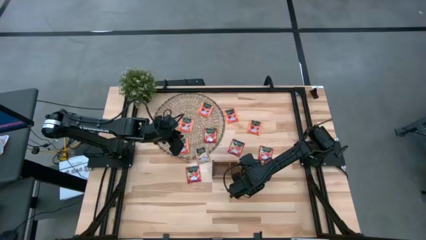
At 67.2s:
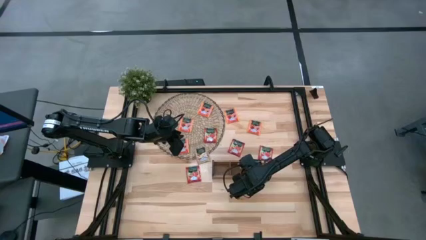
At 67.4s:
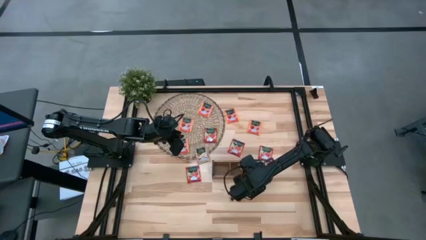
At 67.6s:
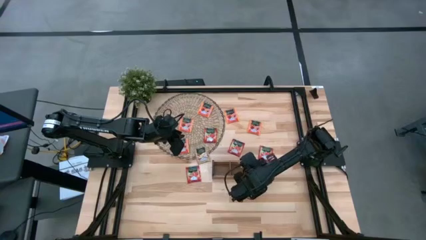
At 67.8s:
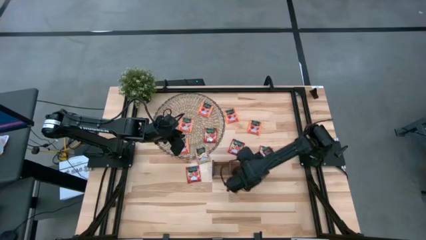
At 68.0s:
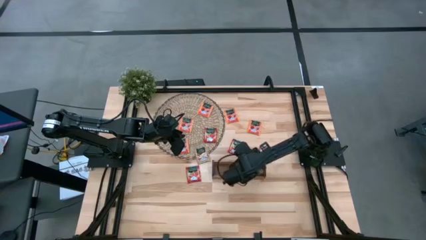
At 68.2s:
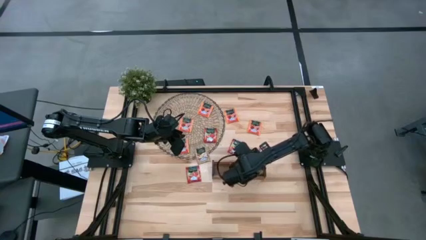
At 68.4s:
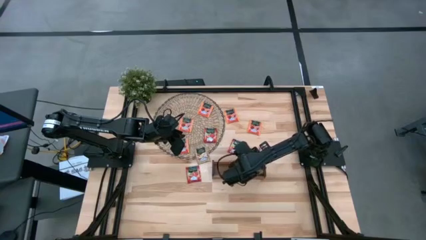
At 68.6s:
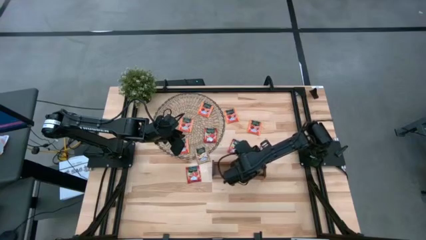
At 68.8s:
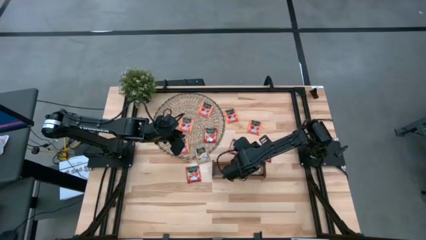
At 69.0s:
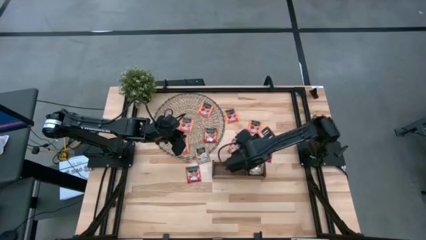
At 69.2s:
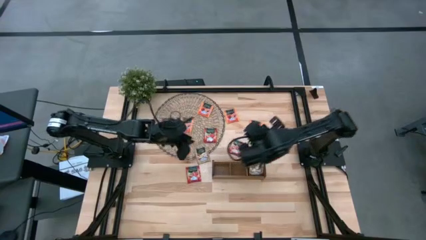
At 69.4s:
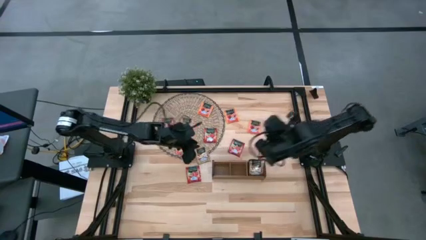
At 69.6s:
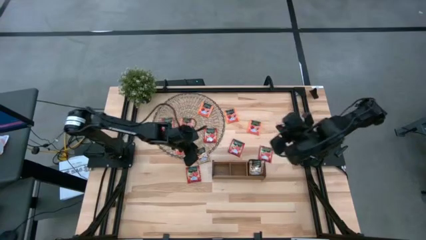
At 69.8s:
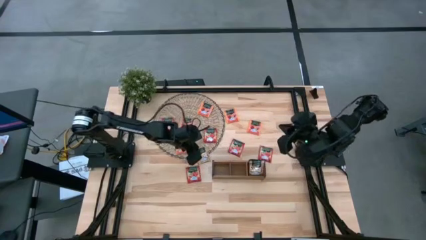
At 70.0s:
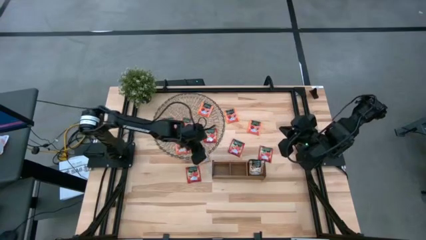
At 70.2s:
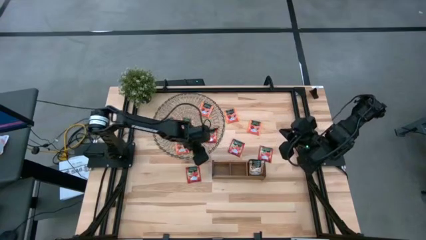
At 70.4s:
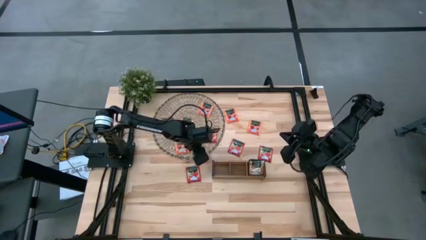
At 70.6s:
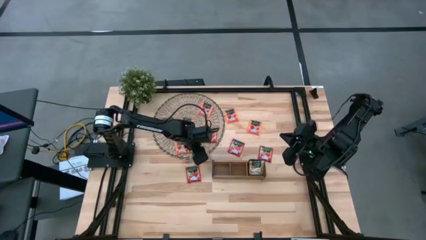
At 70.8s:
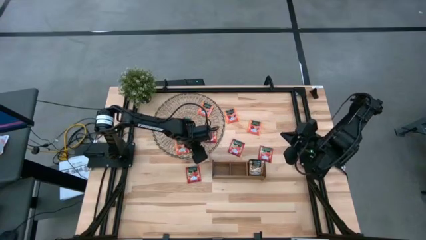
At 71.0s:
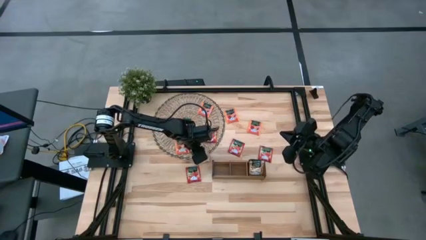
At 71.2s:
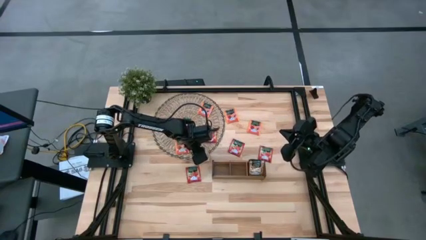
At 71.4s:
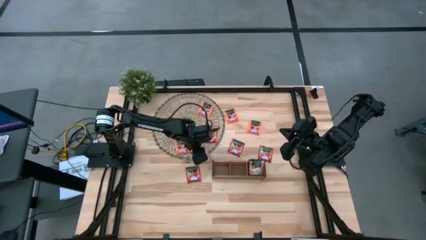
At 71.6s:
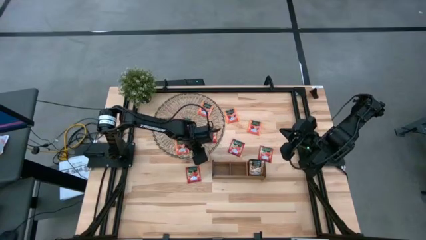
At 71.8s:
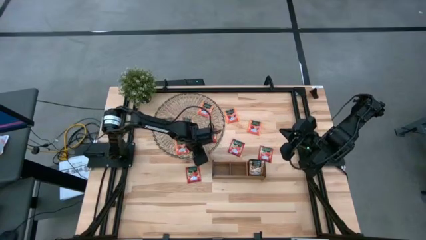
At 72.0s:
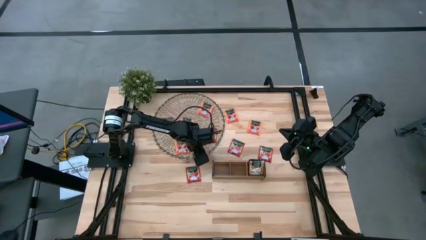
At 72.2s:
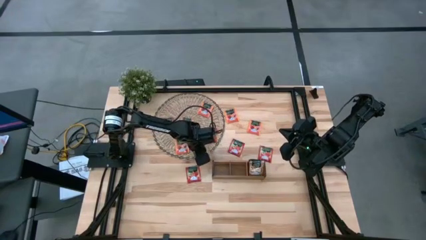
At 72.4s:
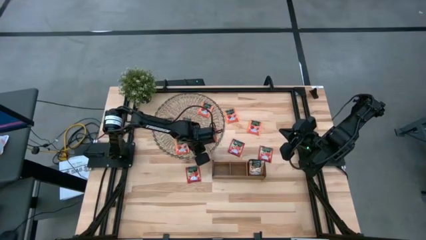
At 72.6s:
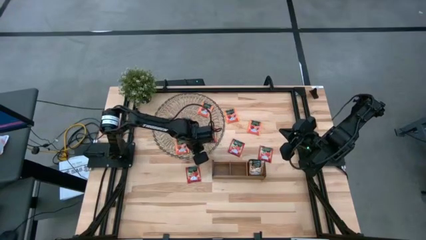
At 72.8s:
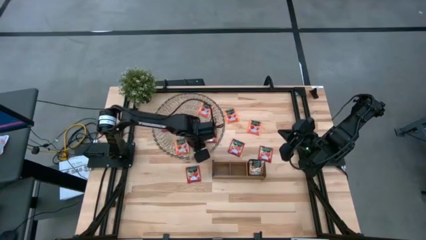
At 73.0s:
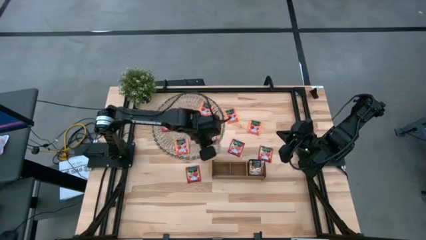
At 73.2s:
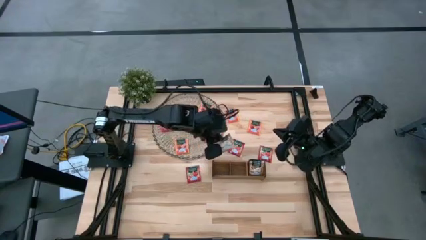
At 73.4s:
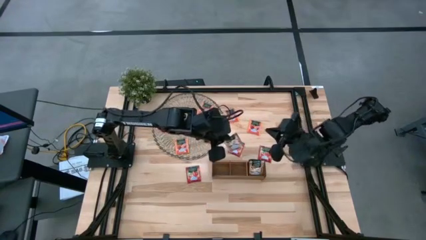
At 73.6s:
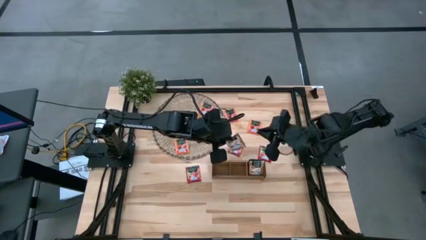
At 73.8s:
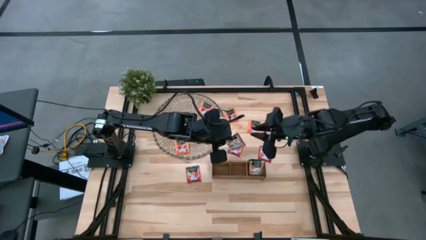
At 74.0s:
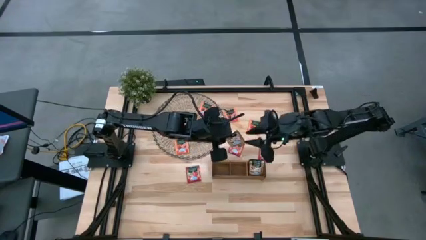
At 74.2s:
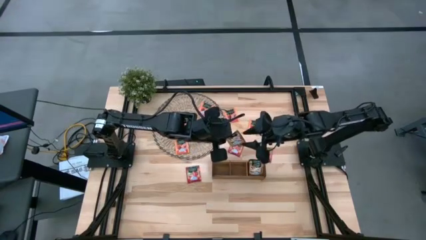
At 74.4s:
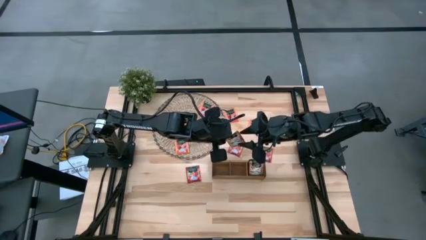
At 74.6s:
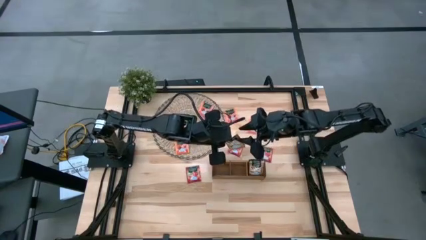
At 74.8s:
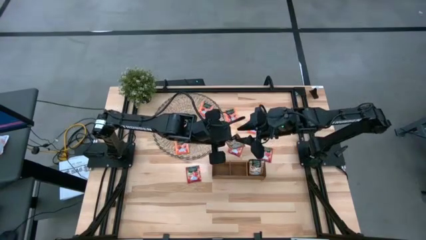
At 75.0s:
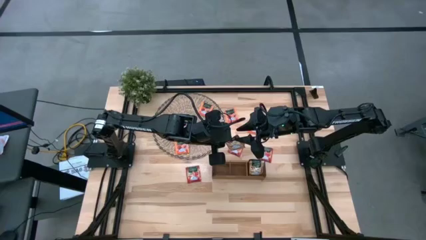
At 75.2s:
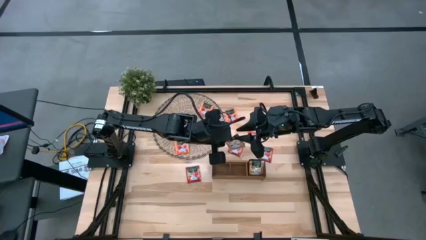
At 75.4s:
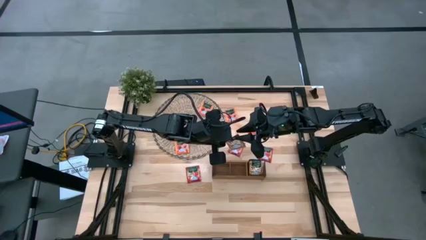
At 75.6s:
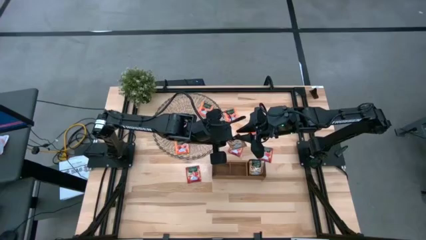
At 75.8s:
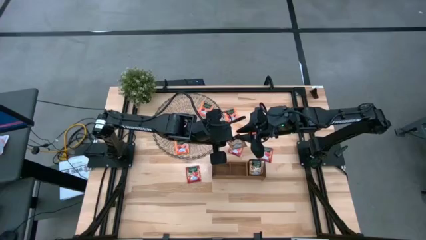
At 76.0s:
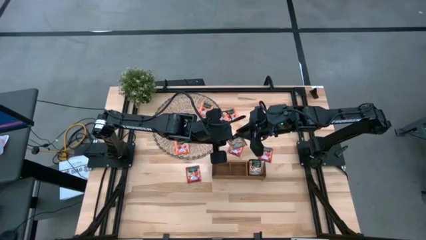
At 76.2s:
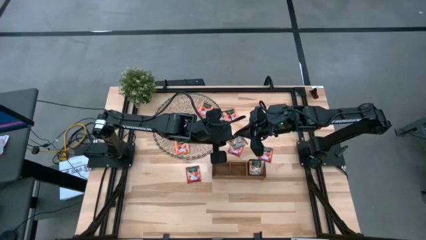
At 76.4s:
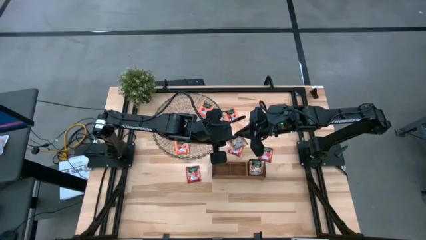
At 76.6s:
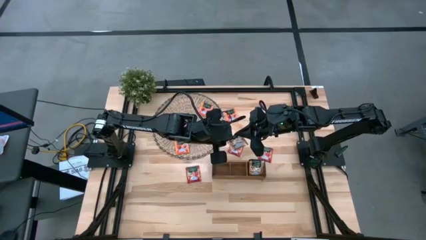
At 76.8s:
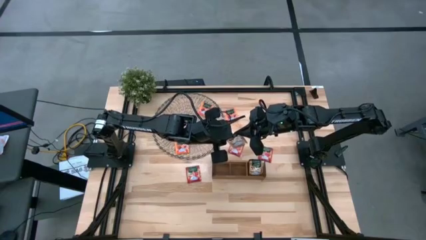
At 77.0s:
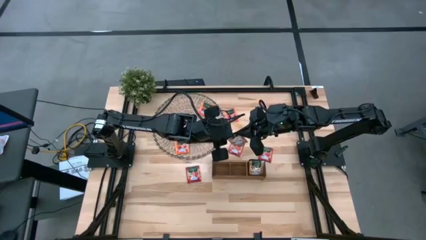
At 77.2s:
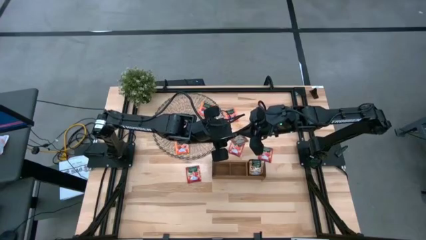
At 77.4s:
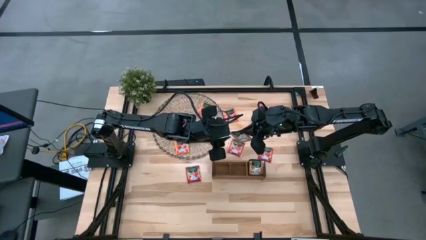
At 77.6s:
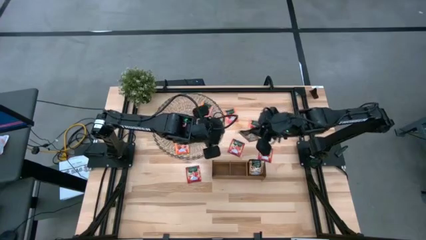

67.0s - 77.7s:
Task: Pick & Place Tea
Put the brown tea bag into the right slot of the wooden organizer
